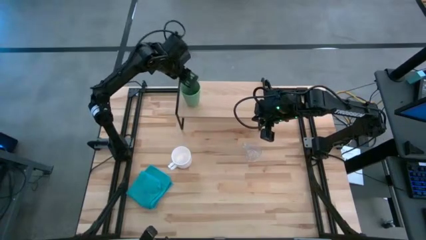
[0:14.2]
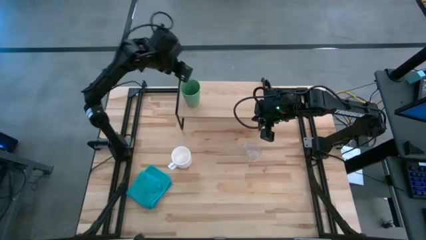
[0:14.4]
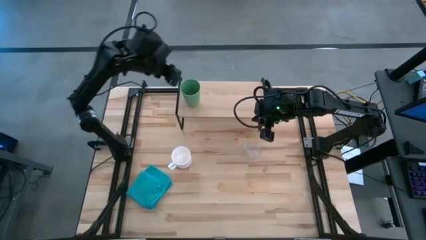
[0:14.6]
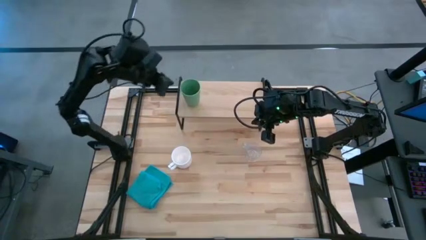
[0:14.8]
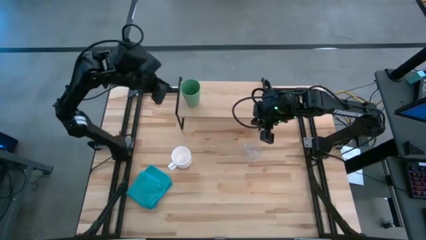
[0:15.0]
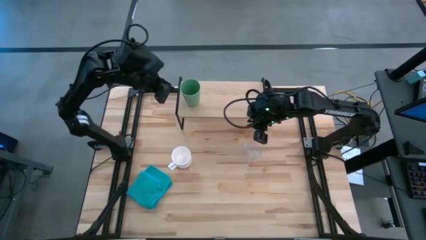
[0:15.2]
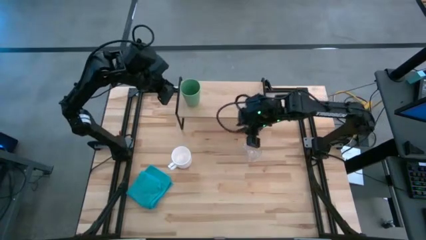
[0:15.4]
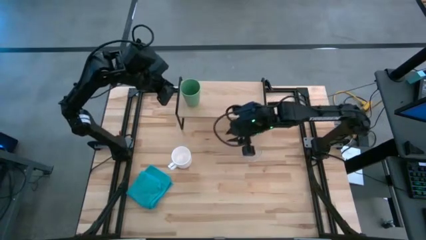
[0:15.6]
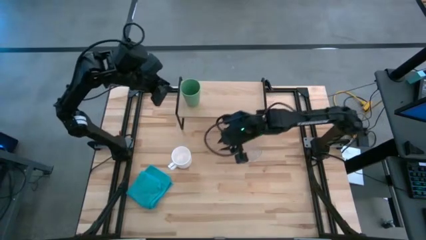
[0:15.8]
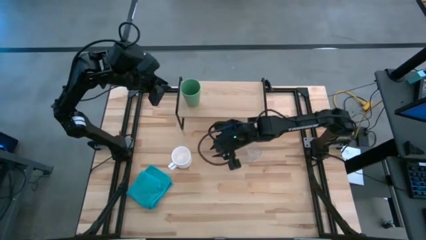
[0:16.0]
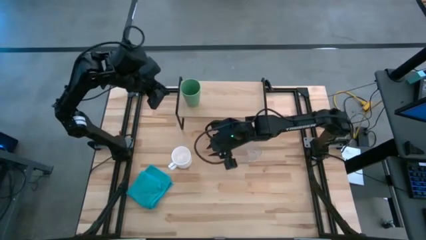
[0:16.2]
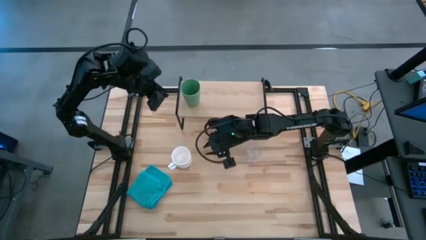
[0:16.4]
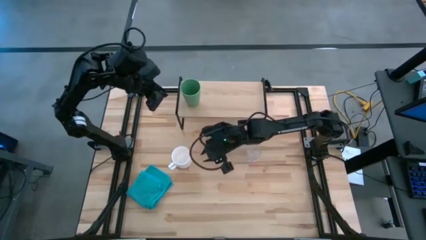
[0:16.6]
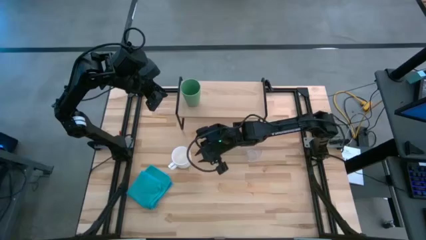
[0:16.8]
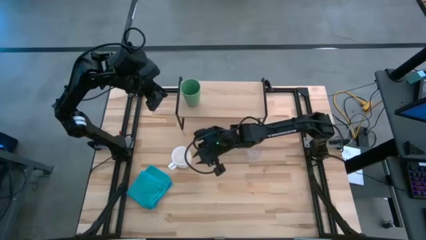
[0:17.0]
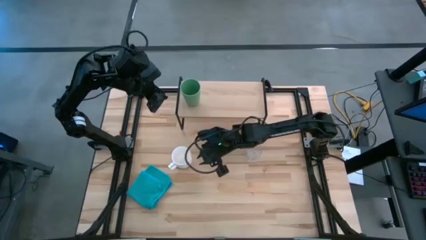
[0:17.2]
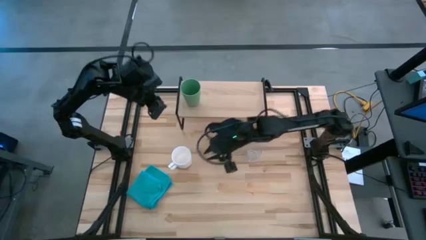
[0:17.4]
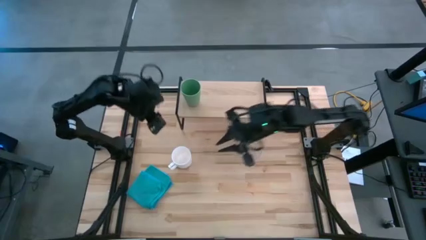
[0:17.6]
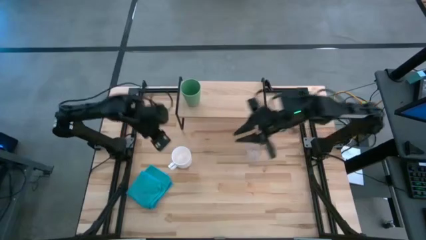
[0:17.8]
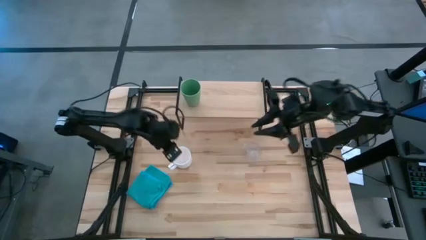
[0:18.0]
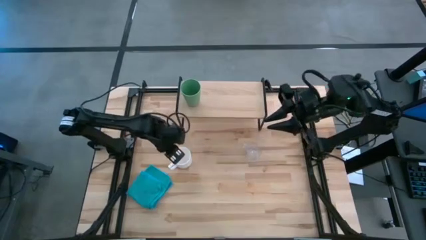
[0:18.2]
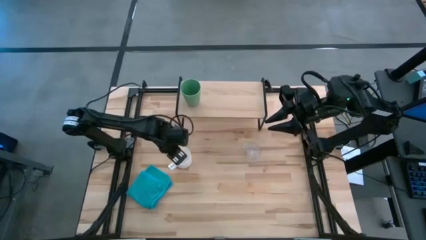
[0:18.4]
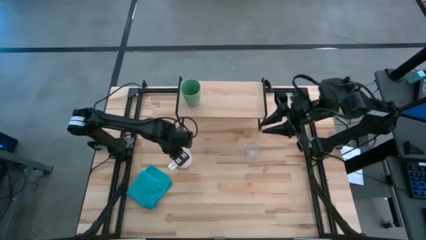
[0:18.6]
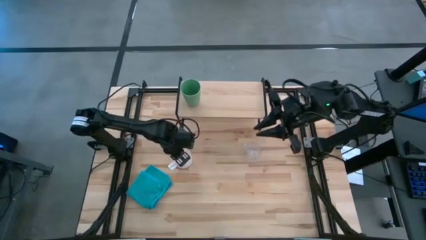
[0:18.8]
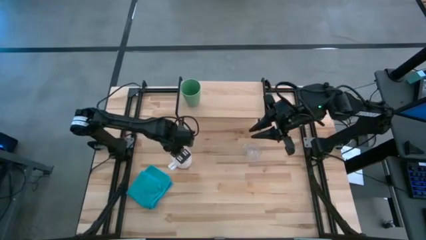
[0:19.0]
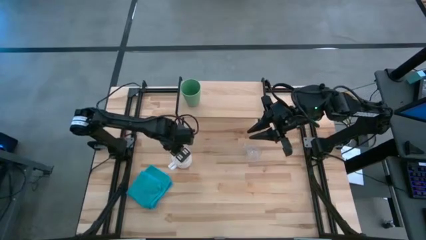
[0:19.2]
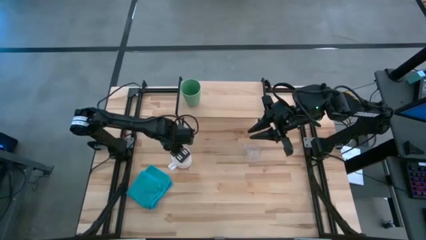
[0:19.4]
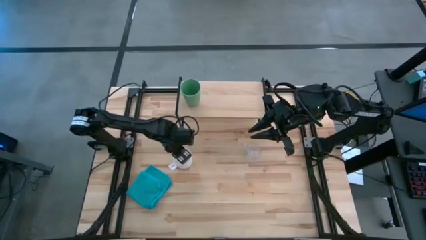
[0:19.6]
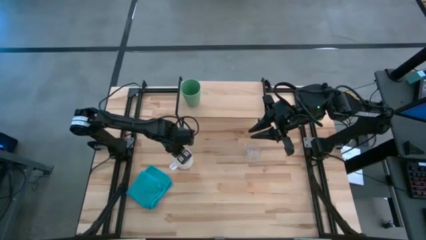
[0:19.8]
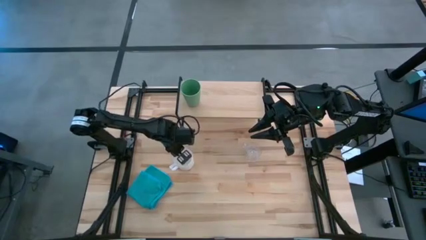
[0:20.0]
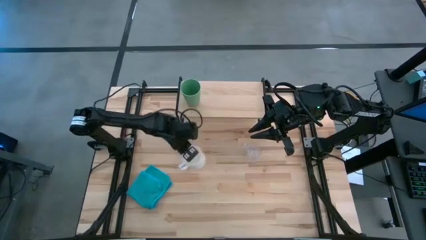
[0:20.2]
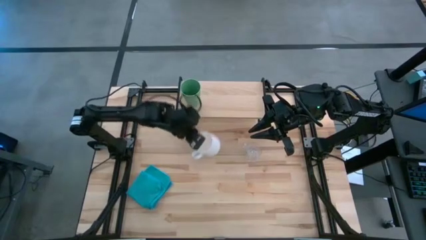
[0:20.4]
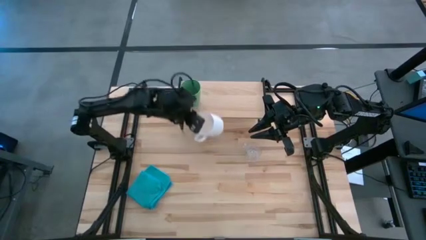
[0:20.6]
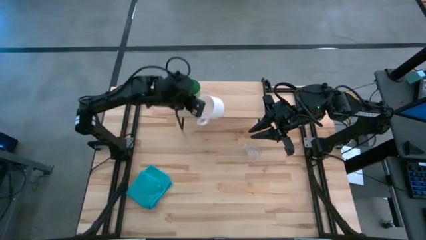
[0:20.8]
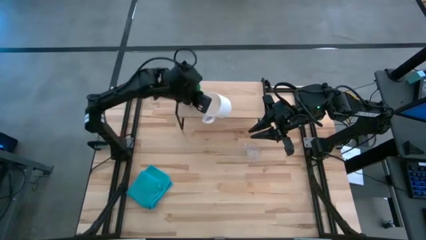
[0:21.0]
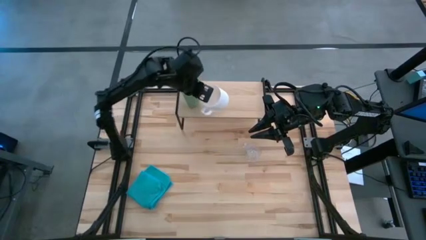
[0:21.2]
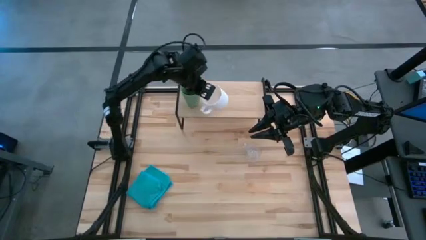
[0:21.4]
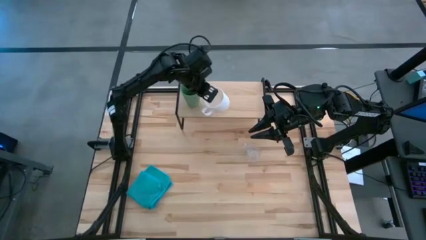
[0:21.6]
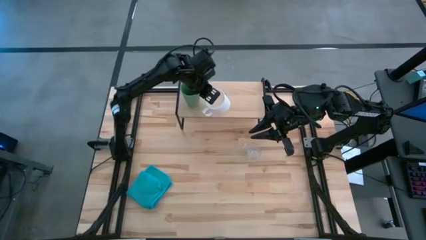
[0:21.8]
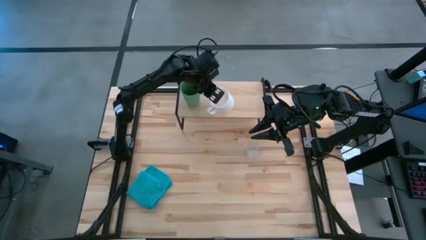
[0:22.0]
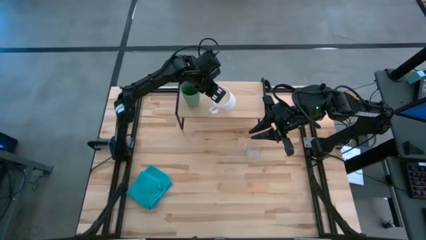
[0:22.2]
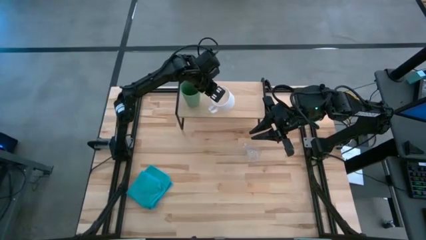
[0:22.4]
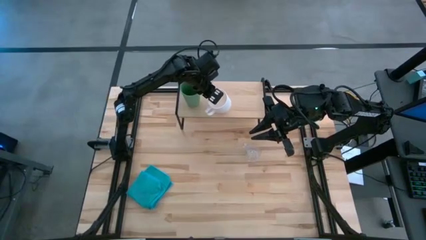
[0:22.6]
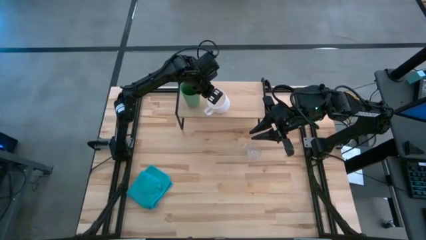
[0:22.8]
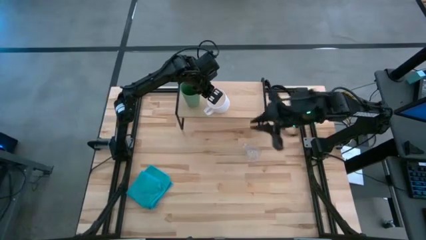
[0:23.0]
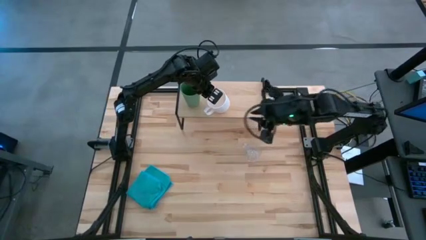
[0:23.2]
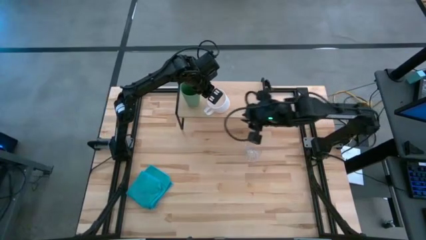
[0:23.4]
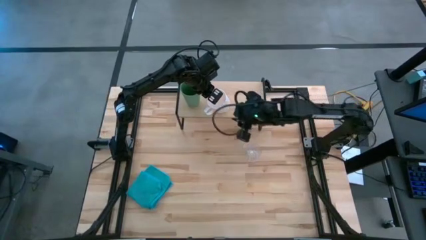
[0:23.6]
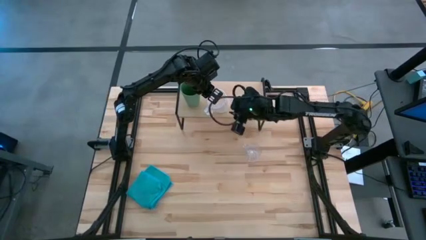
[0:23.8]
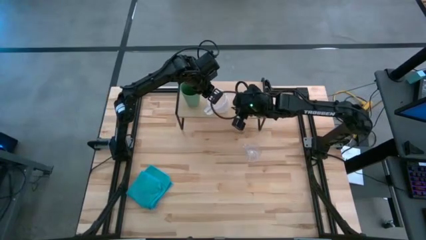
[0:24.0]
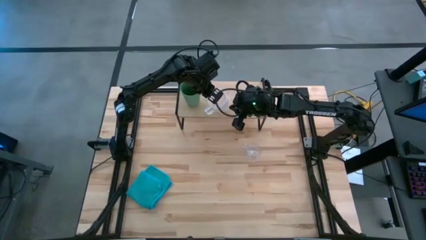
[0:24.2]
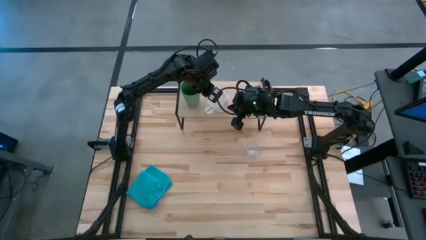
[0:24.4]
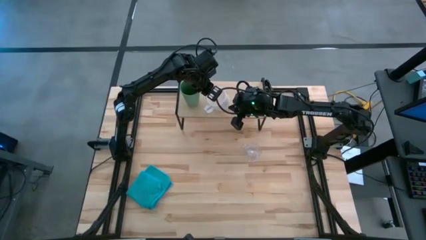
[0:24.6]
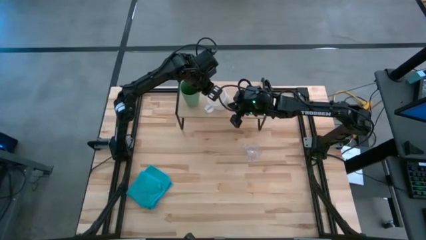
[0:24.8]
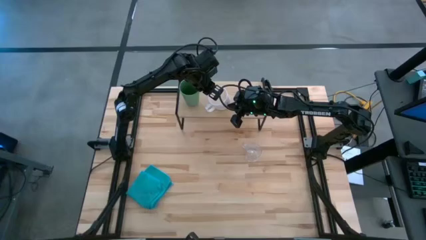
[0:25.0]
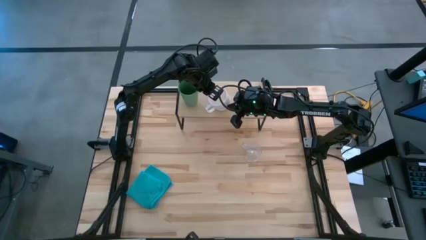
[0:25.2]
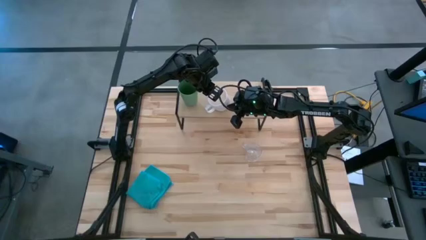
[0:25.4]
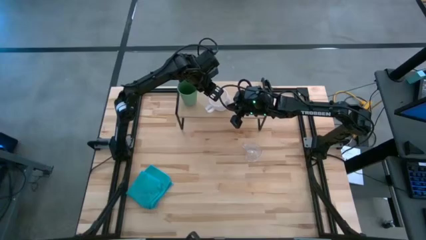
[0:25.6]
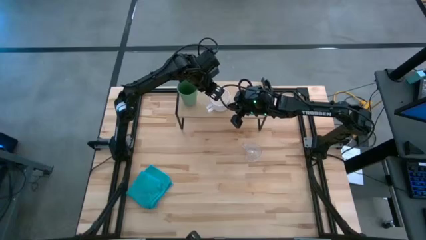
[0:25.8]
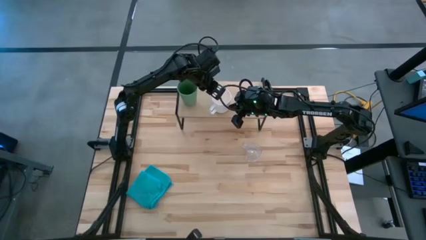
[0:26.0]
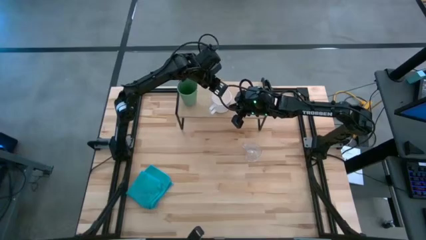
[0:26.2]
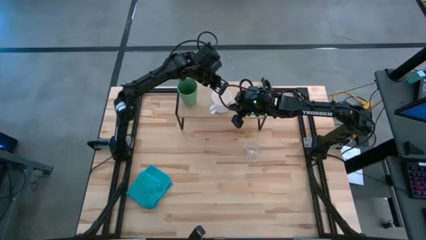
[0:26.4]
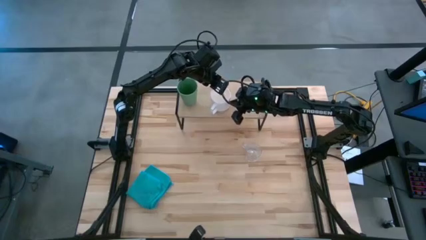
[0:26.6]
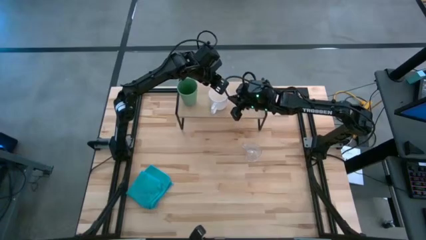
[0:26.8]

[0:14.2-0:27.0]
Task: Stack small to large cups/mugs on shelf
Put the white cup on the shelf
